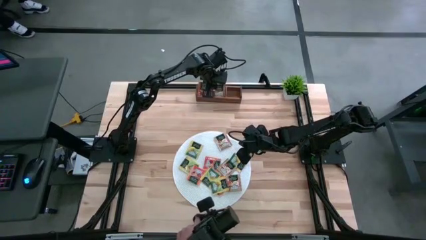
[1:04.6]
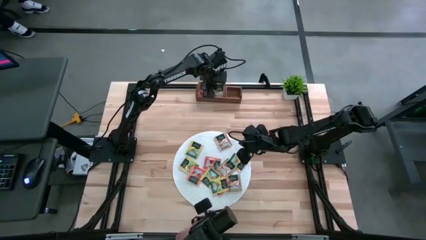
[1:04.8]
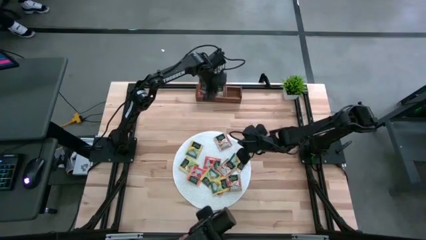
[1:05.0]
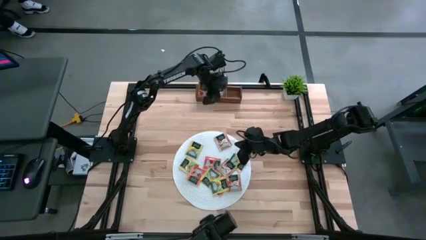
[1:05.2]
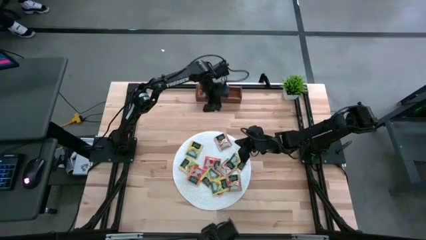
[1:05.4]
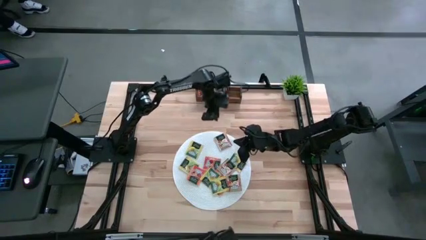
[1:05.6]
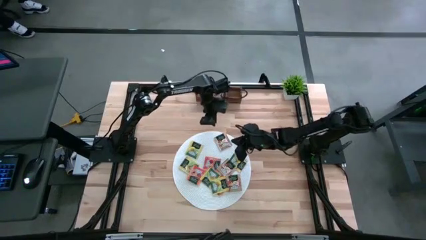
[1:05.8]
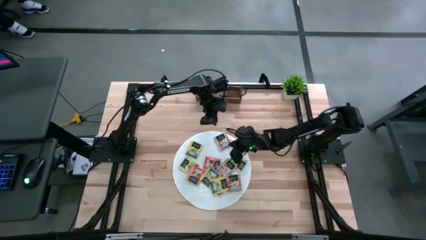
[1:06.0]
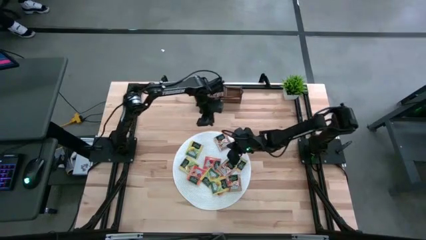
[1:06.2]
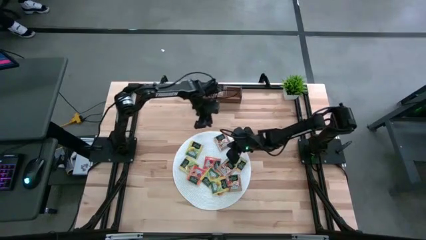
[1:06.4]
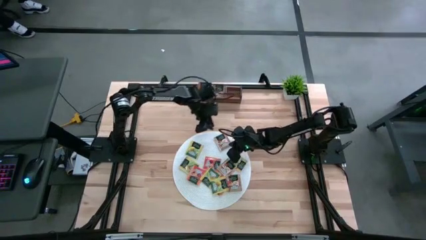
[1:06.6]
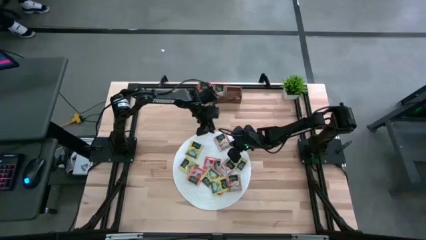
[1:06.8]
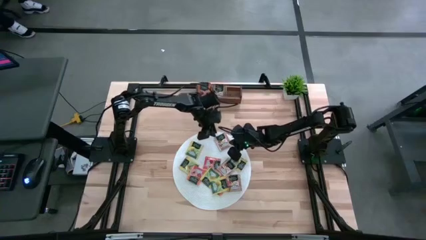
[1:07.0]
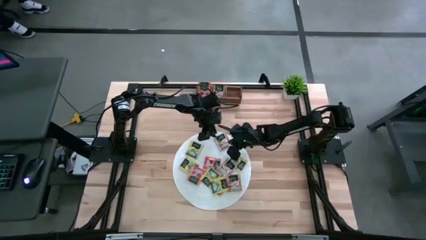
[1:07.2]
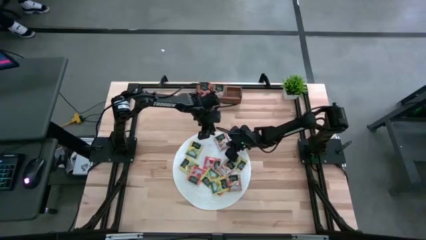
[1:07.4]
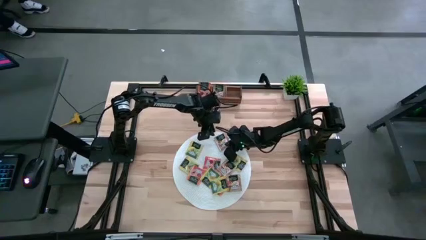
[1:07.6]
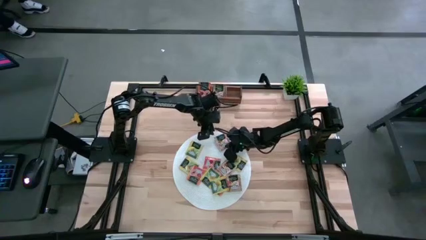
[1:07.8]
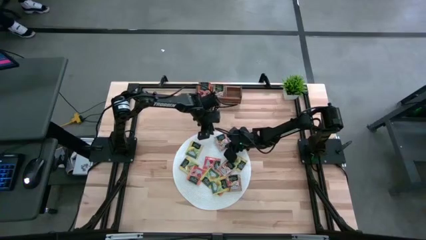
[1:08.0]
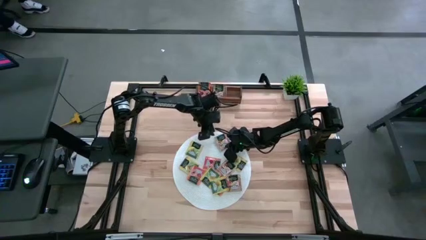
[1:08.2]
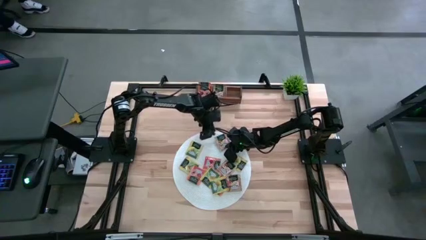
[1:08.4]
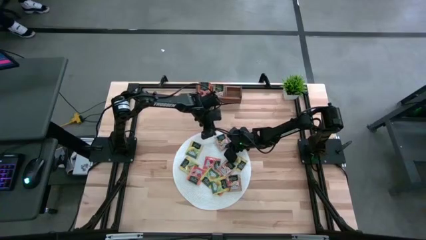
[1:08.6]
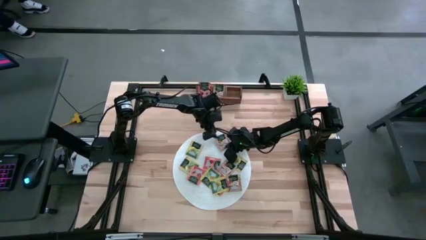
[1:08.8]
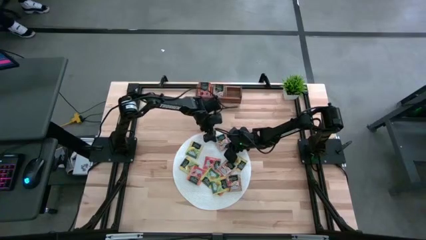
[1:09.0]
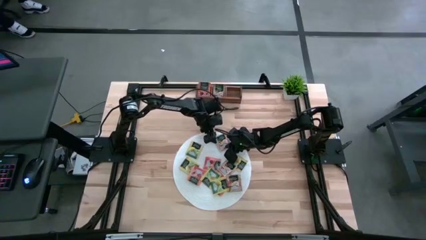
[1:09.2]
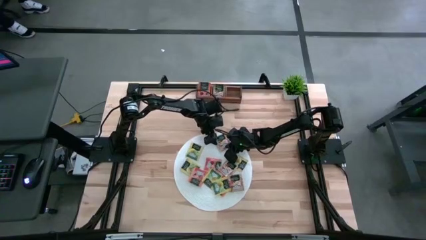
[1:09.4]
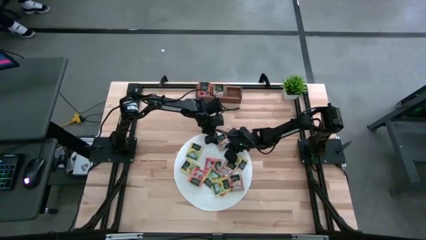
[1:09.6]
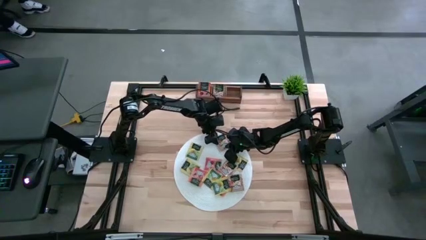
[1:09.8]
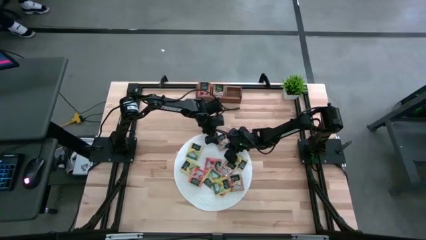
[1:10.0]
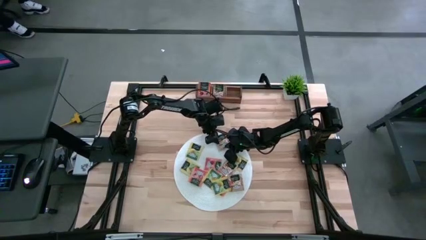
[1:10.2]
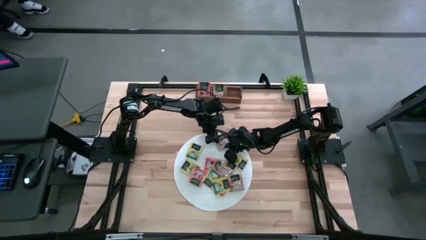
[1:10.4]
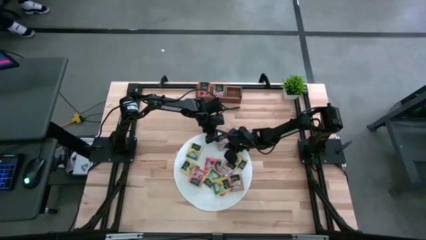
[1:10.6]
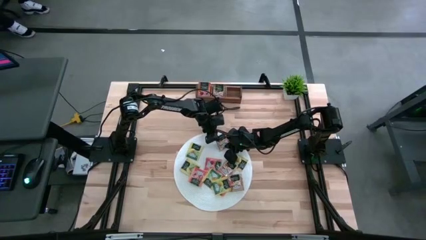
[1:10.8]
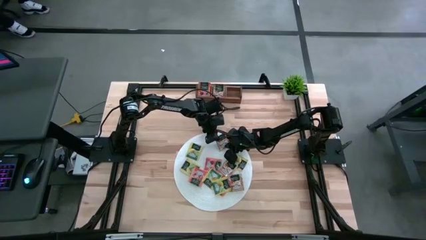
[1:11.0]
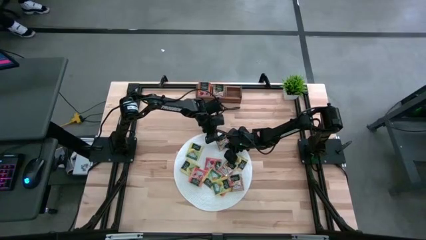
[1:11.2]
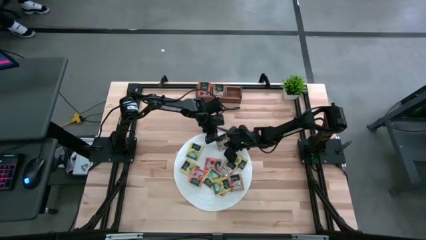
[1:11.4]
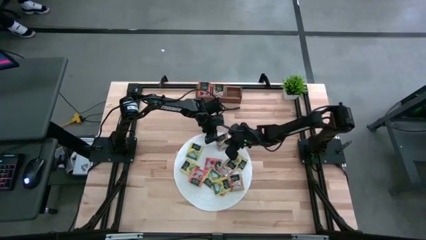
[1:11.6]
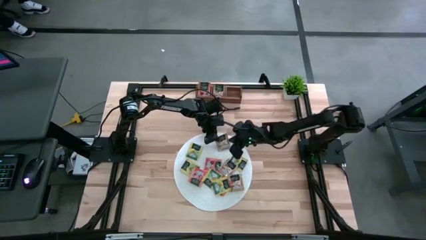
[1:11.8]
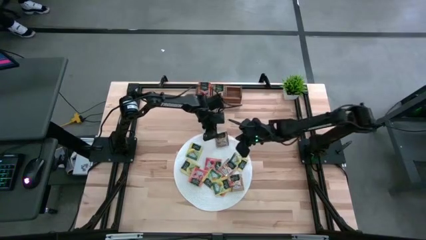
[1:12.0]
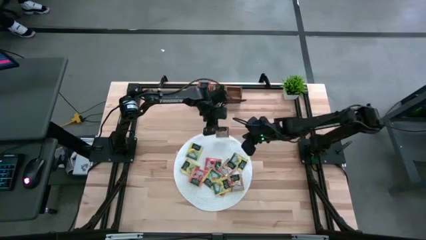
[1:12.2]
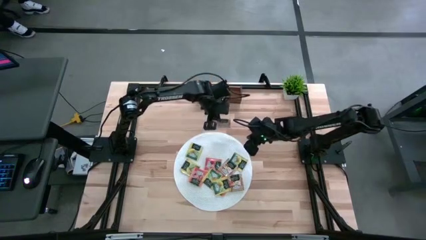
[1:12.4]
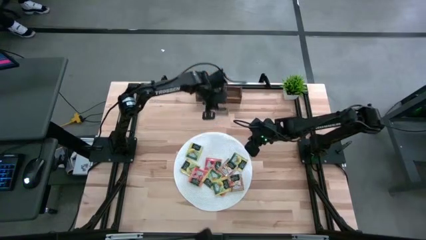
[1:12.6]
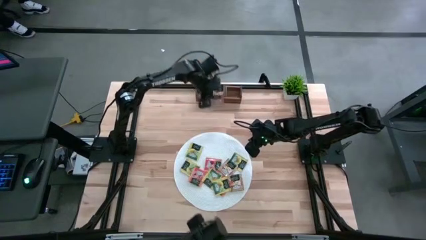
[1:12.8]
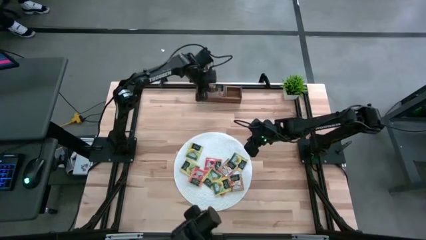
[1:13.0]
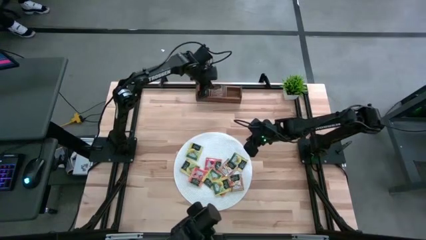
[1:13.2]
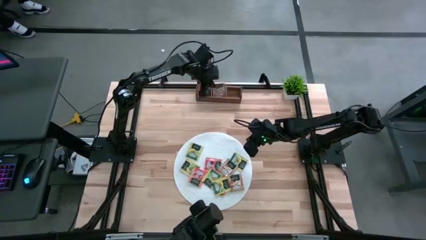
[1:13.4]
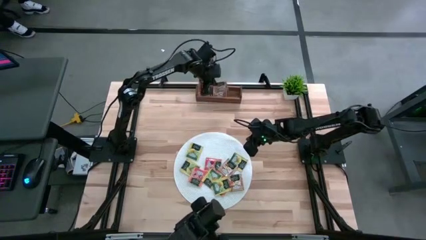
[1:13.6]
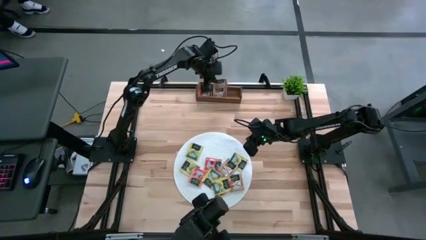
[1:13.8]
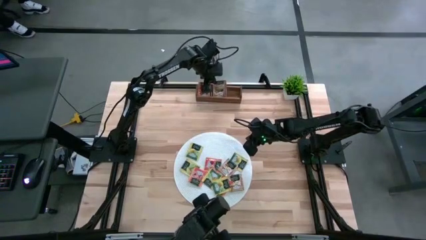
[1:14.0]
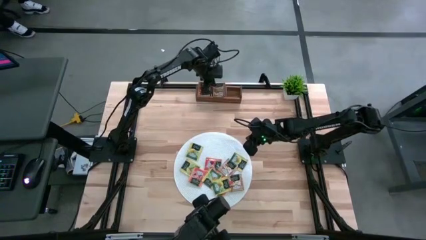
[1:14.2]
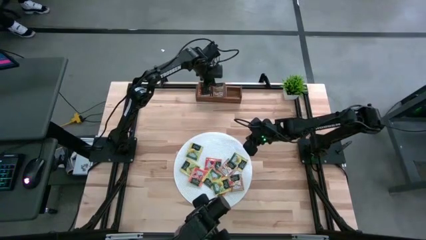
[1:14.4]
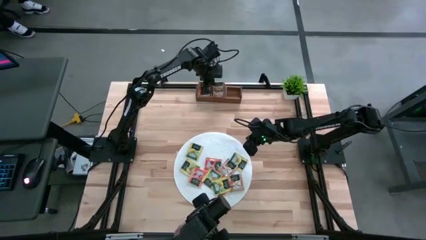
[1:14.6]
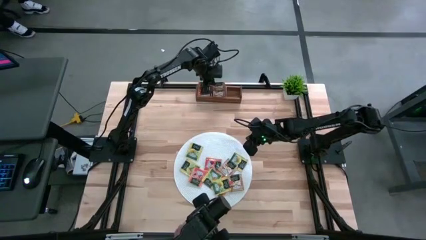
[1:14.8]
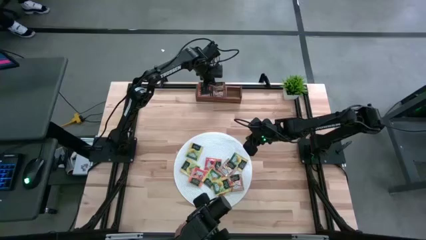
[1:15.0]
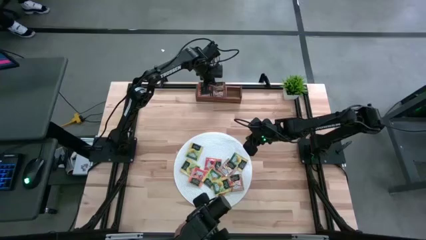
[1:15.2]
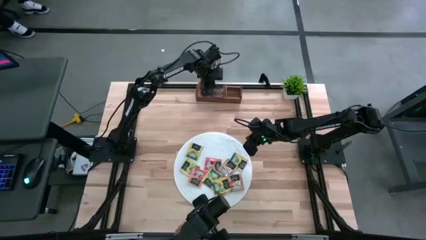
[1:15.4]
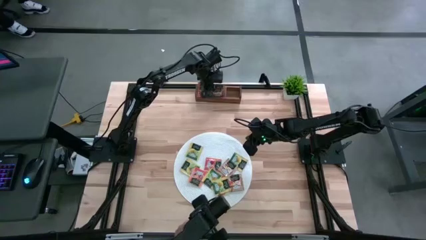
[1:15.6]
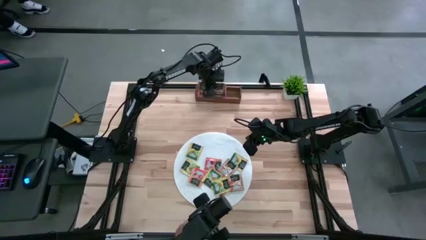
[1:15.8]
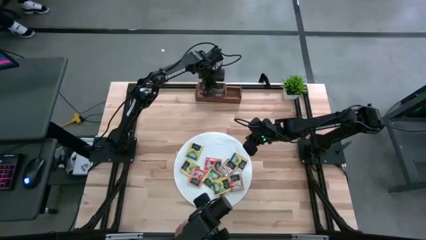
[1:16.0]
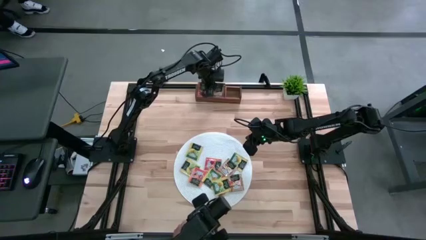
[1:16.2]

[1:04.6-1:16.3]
Task: Pick & Place Tea
Put the brown tea bag into the middle section of the wooden organizer
